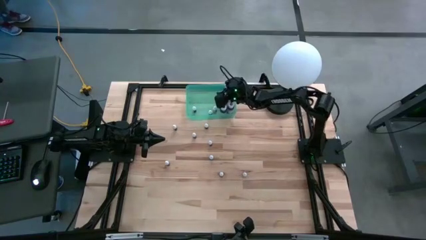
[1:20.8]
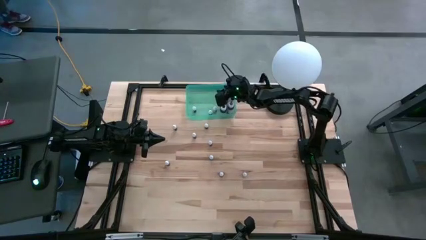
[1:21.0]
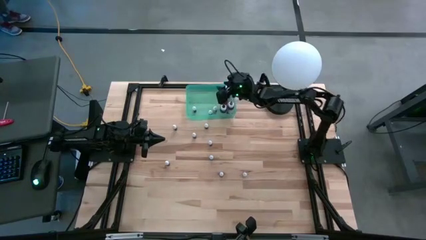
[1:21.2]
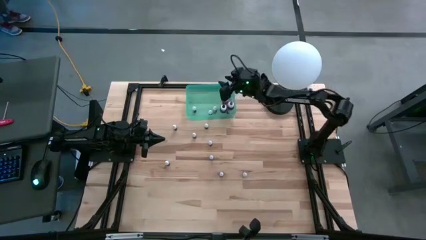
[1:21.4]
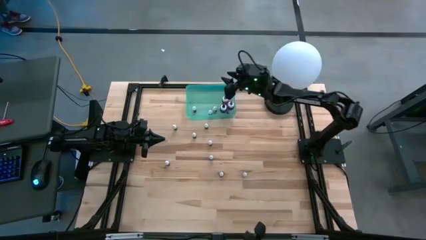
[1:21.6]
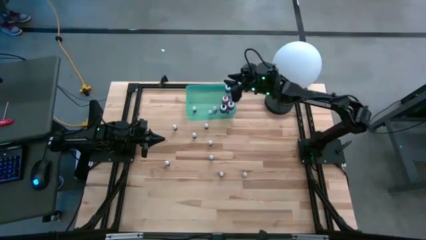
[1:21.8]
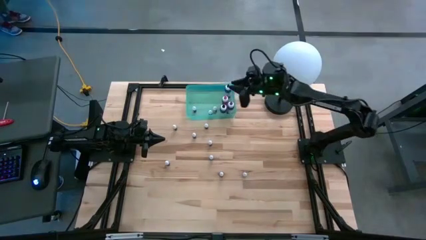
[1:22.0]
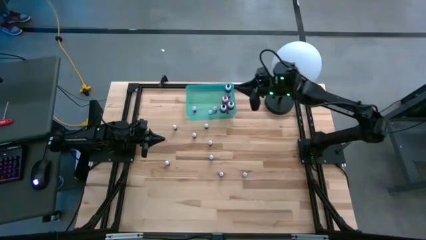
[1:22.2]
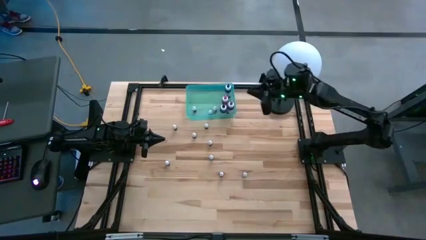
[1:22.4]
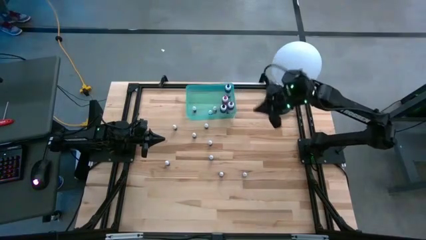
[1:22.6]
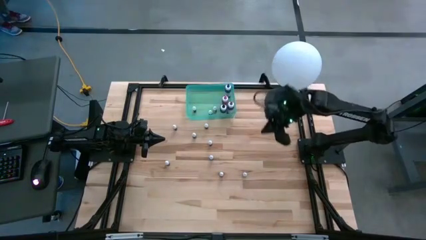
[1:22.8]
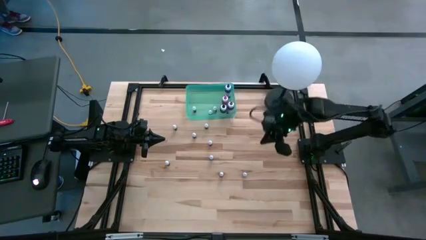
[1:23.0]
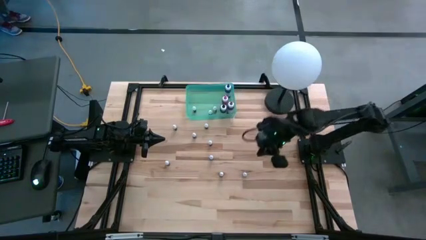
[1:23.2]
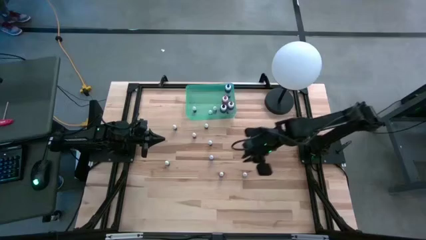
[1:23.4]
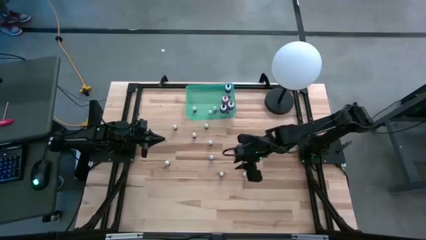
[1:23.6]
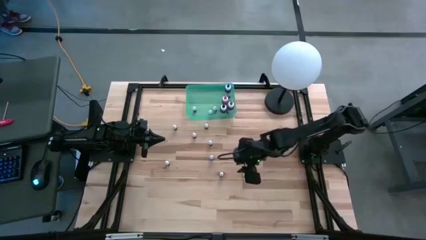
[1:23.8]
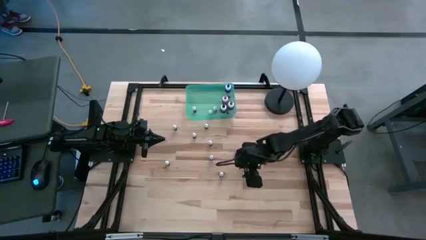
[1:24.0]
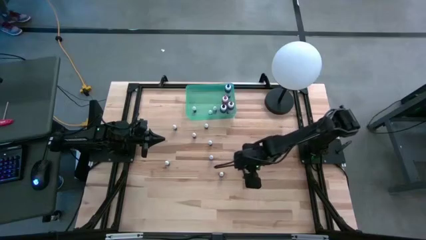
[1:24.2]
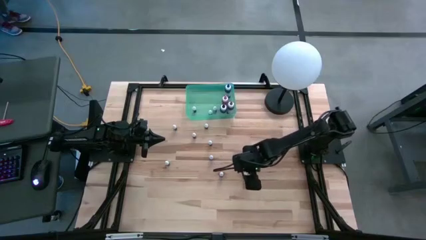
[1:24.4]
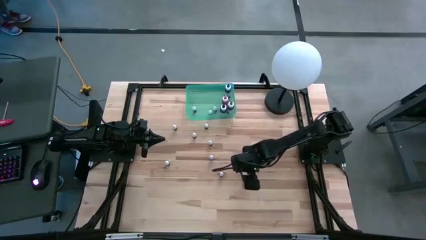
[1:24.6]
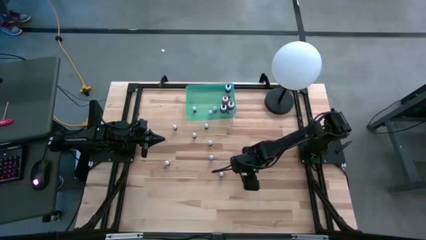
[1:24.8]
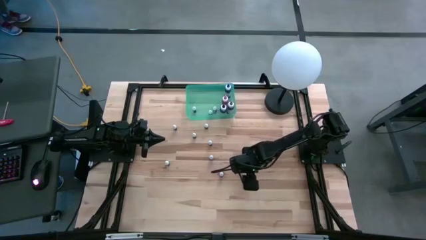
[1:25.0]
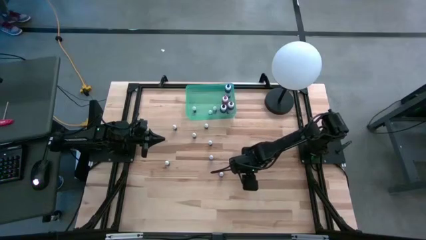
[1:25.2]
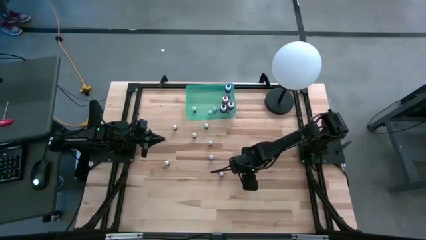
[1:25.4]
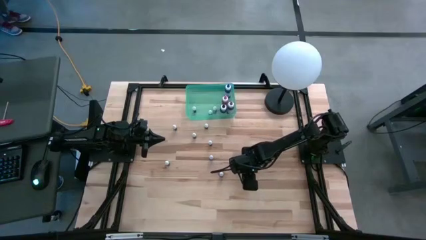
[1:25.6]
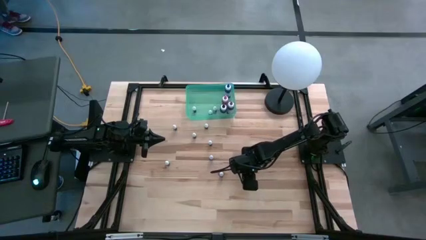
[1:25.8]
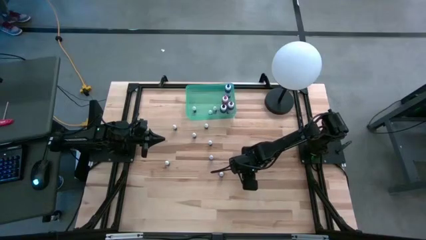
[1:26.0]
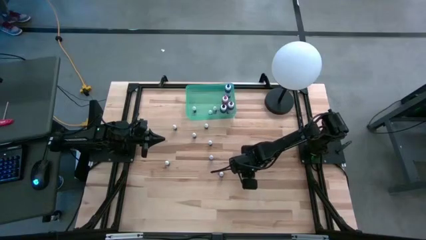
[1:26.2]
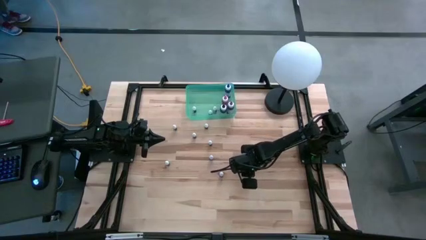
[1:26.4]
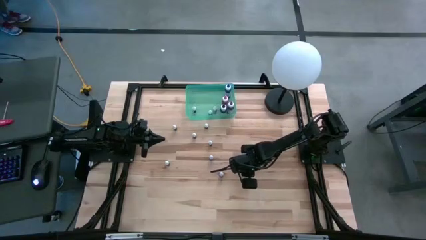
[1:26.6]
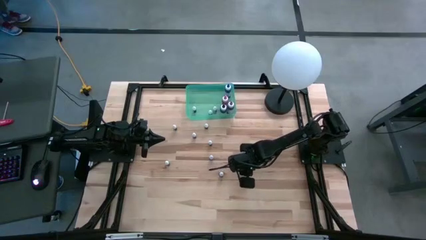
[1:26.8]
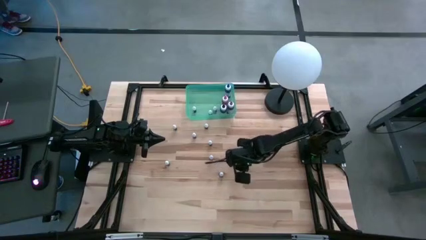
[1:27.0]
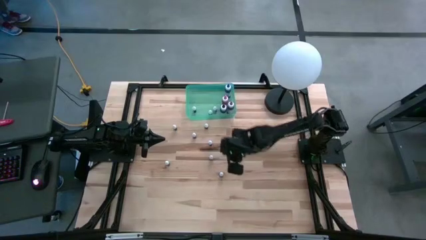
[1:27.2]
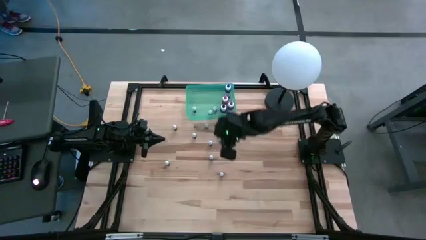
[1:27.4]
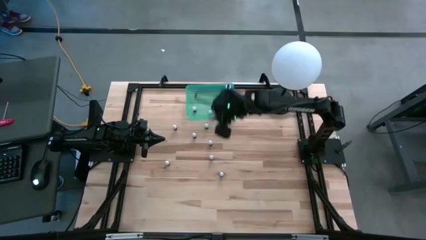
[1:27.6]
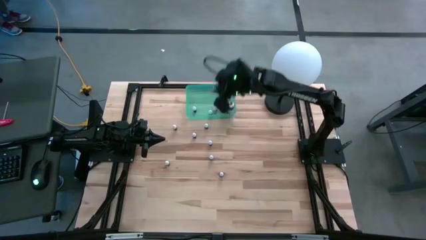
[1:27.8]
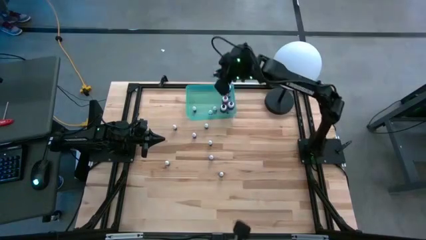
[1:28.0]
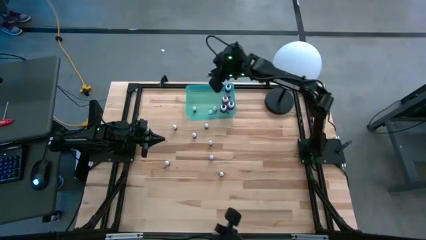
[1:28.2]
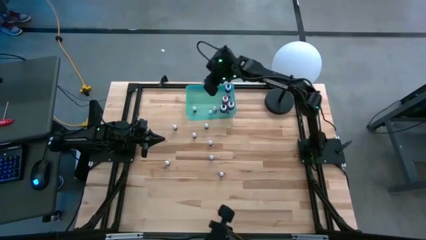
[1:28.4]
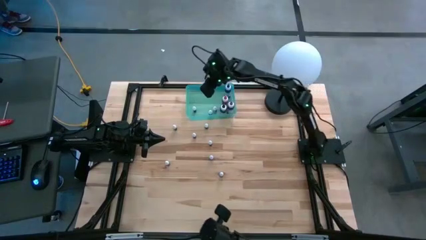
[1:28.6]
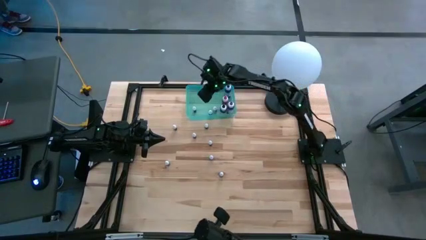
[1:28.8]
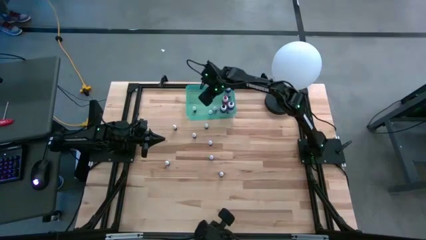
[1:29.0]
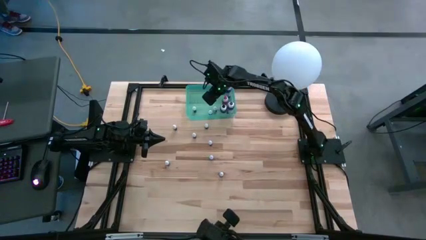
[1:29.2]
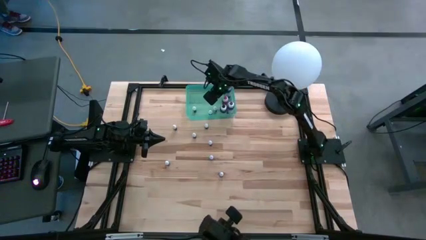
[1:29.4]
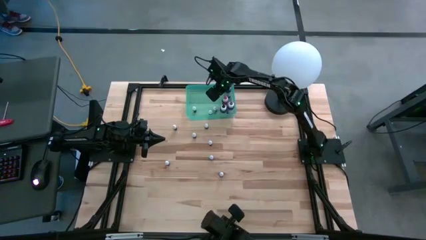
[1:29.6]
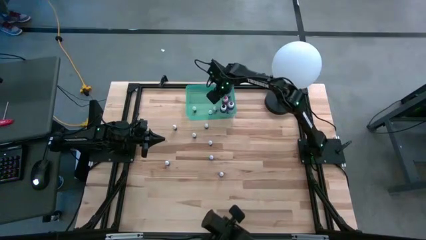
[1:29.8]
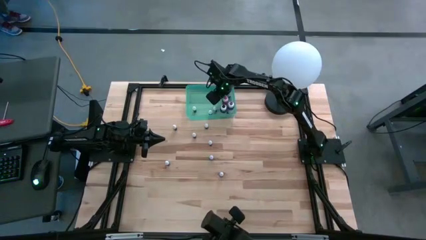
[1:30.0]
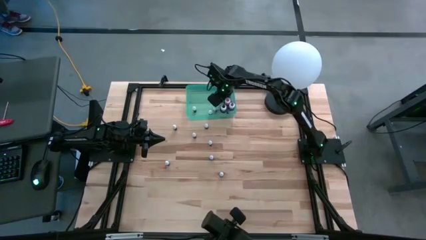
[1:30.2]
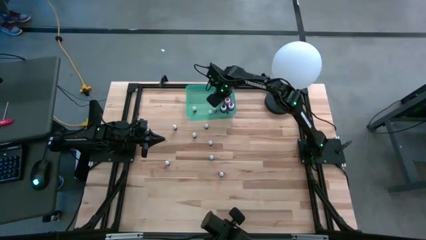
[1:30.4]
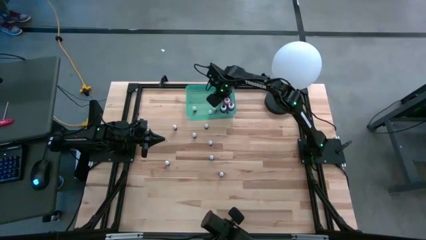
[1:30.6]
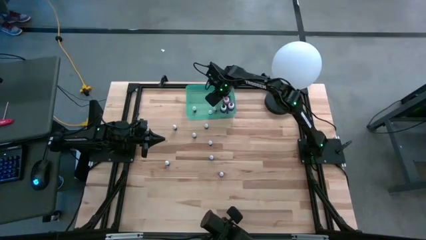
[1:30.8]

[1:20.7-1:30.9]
Task: Pick & Place food coloring
Put the small black food coloring into the bin
